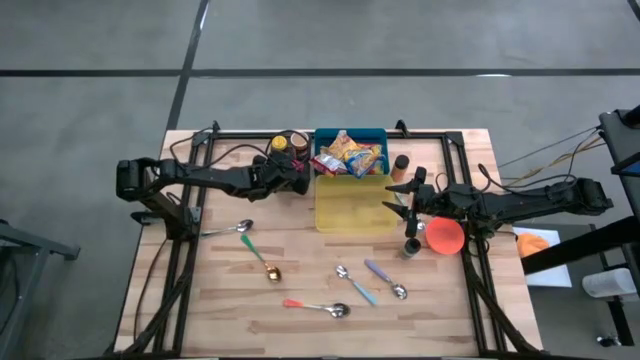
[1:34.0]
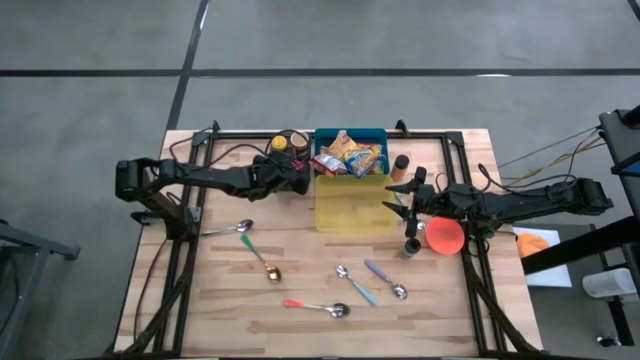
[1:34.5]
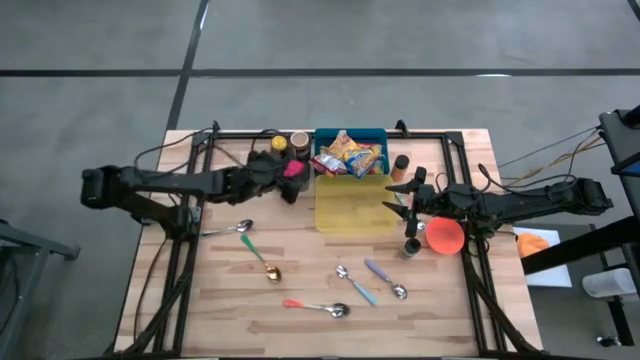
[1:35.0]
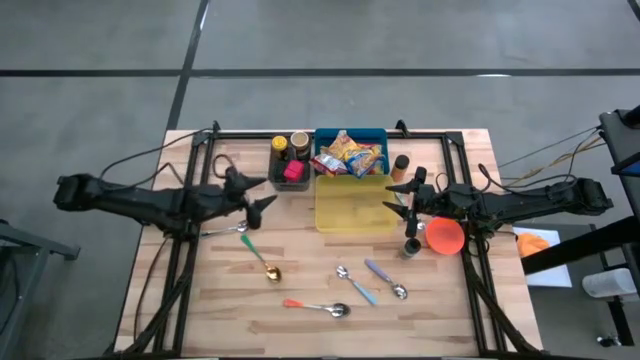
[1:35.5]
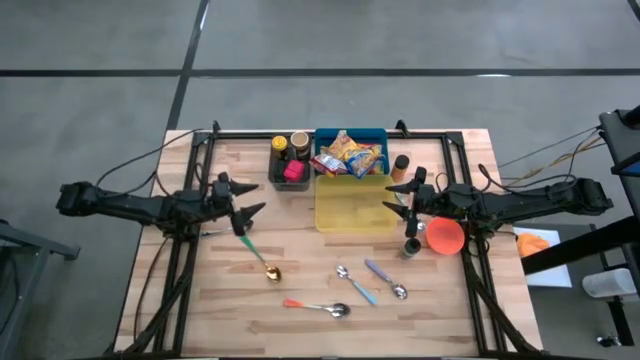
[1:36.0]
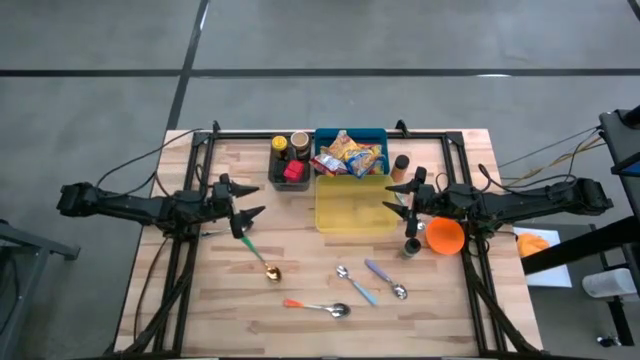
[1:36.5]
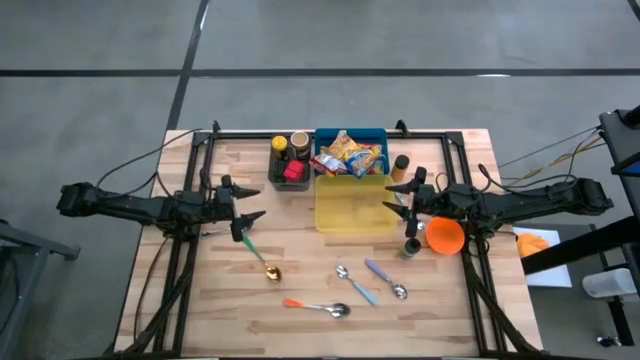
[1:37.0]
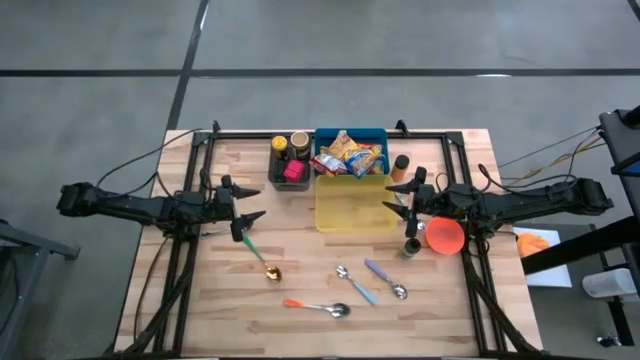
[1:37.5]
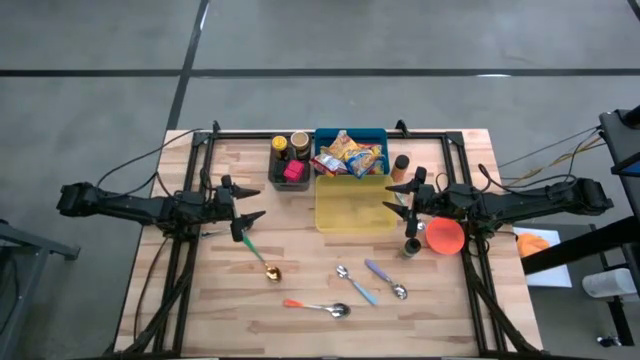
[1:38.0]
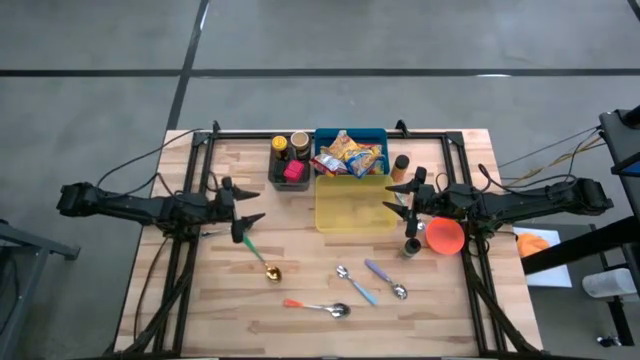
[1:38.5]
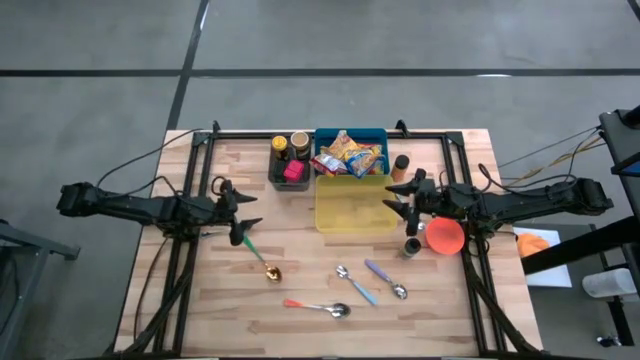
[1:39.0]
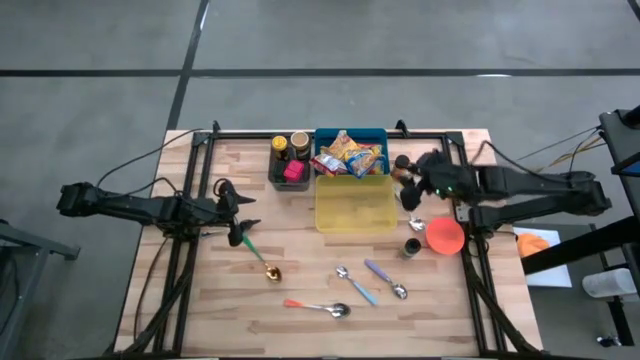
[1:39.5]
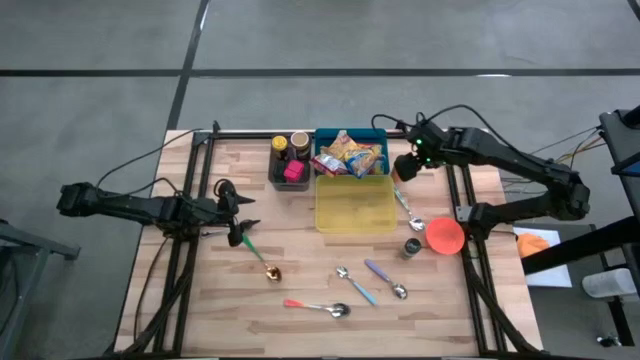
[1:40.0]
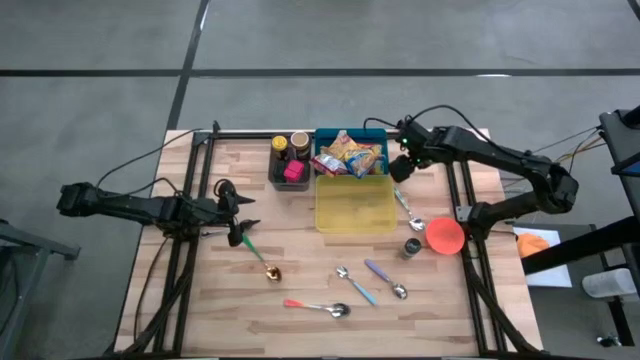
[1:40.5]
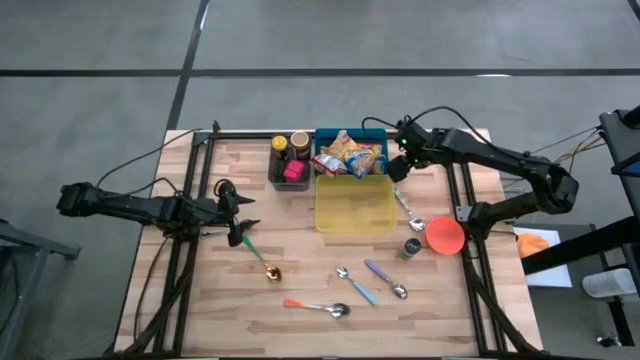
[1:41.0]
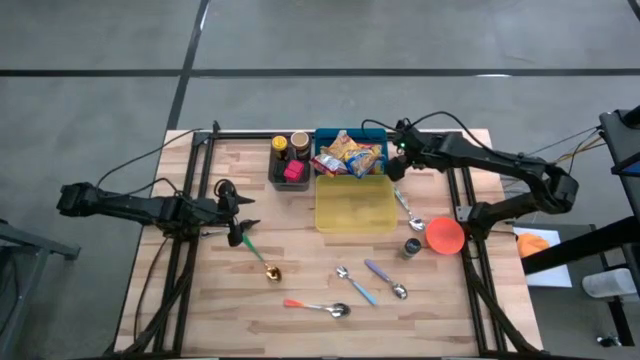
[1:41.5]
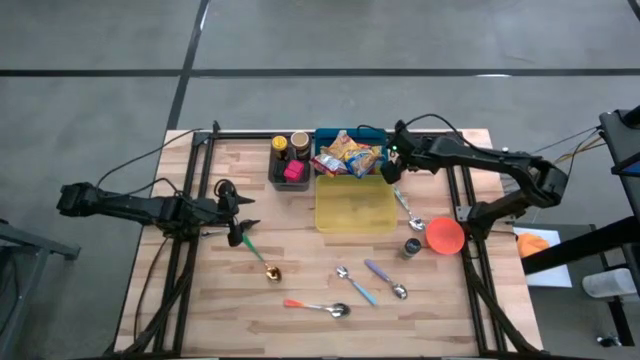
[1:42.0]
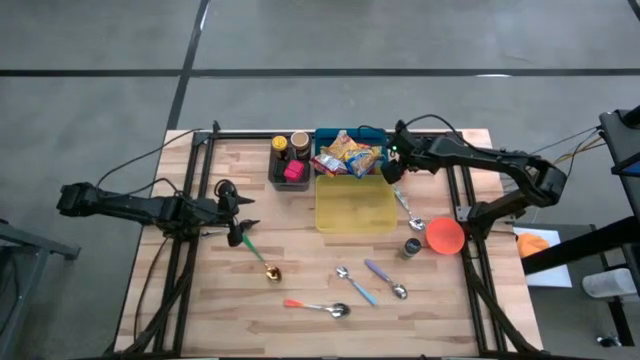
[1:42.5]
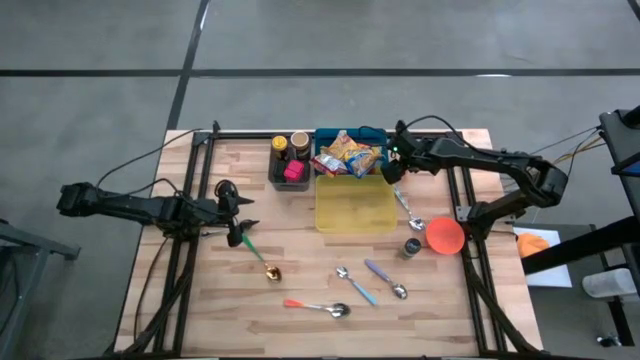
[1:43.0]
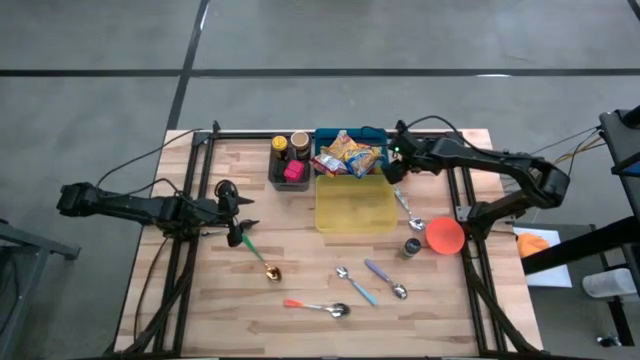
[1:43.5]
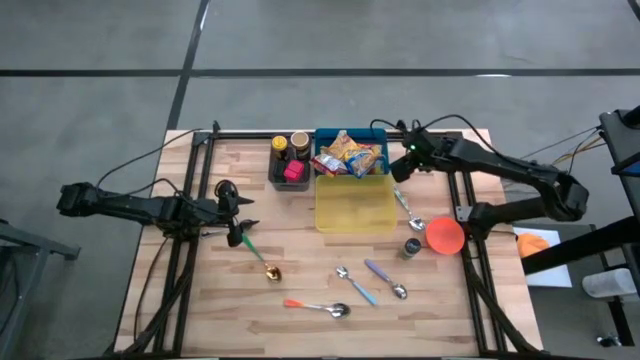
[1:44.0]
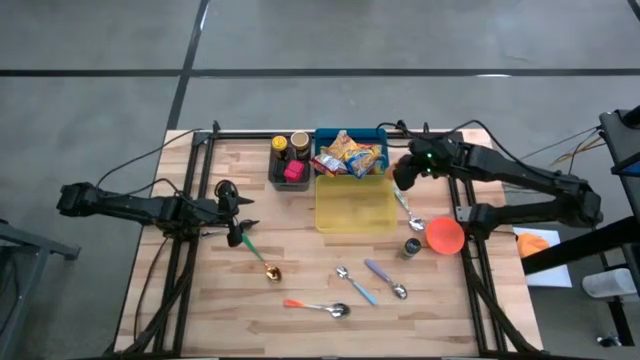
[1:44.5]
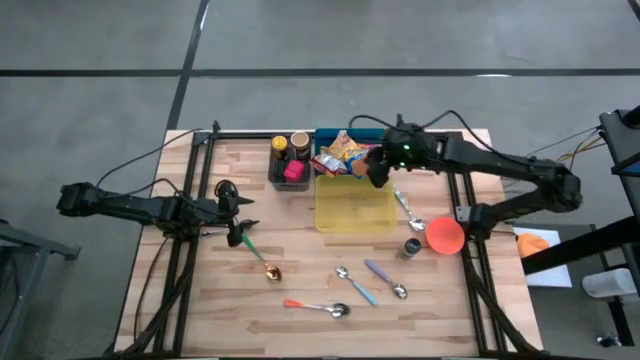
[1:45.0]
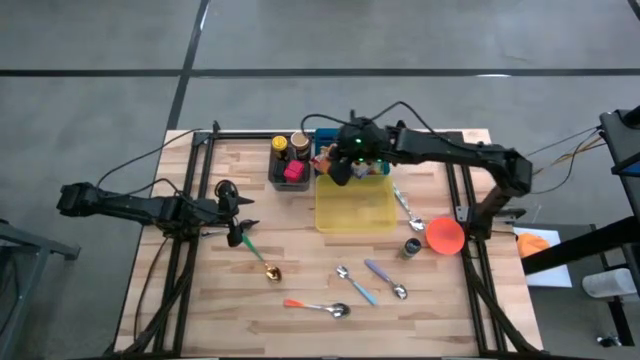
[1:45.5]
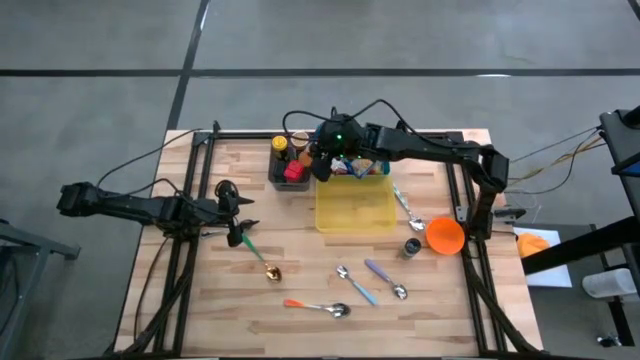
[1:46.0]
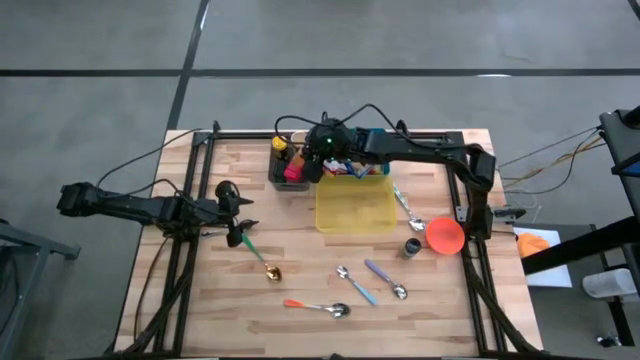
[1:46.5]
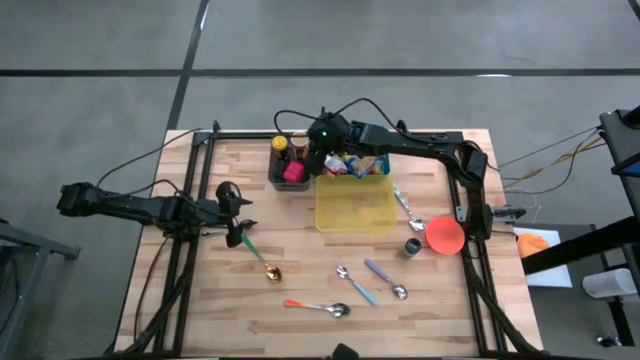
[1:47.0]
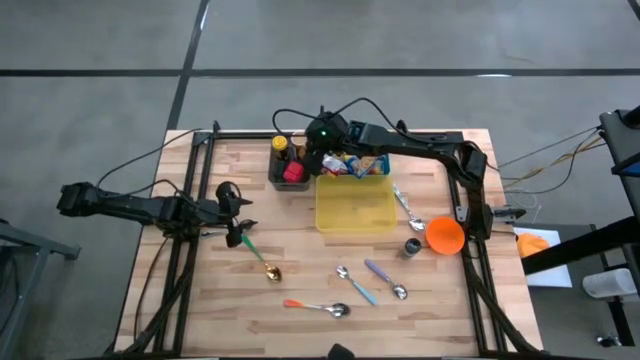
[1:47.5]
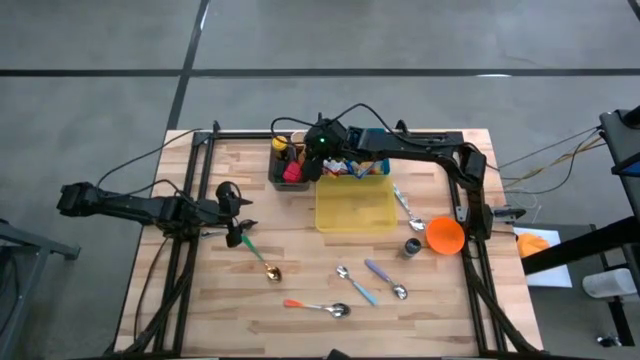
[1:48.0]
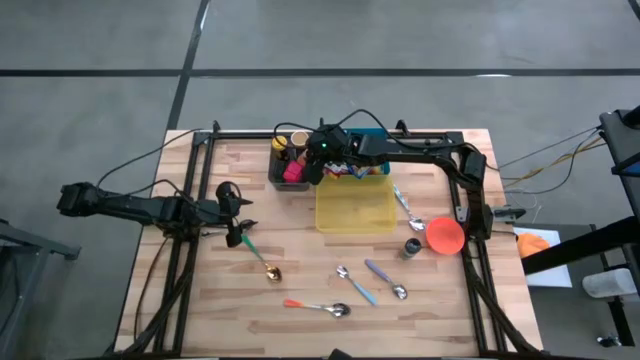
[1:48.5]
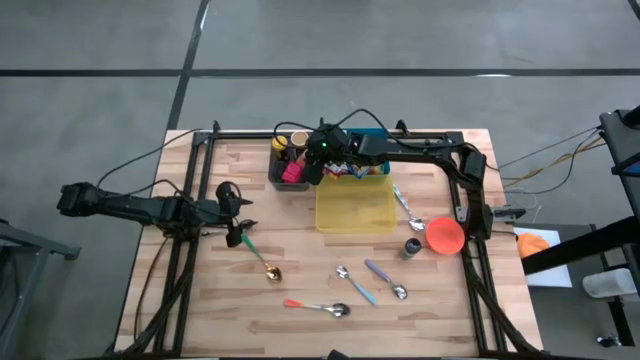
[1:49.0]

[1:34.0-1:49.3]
Put the top black spice bottle into the black bin
